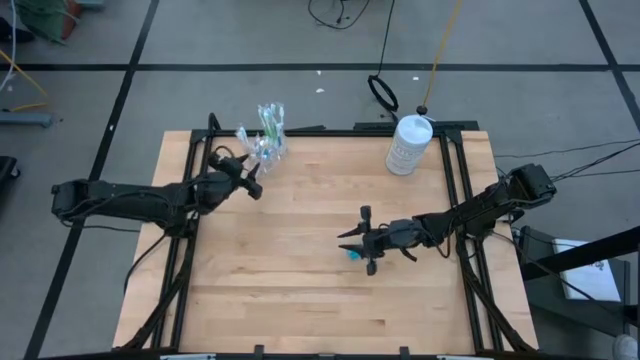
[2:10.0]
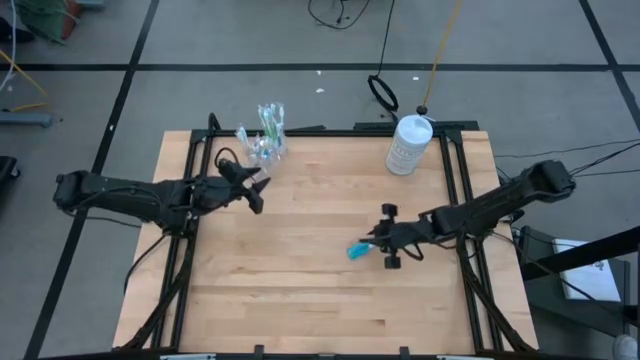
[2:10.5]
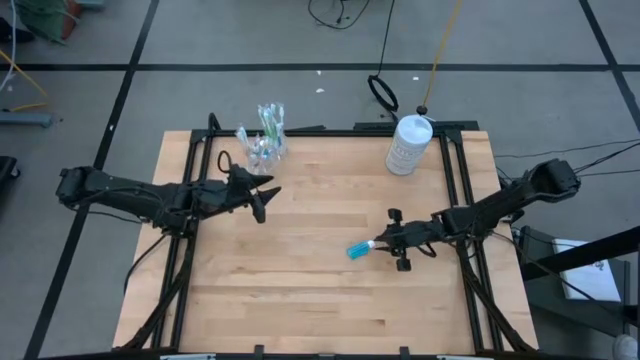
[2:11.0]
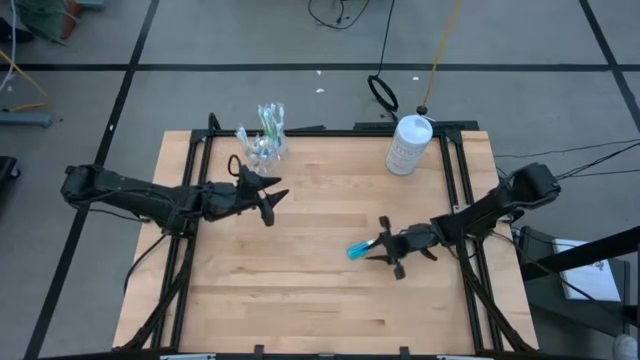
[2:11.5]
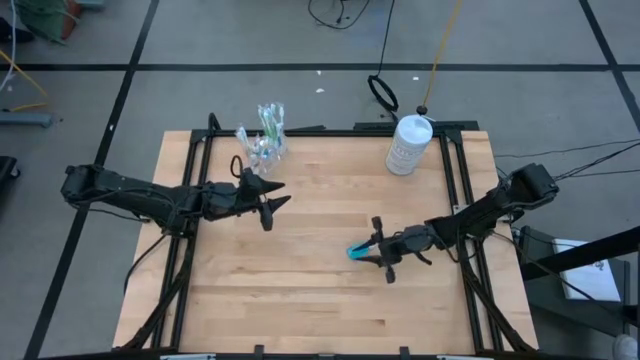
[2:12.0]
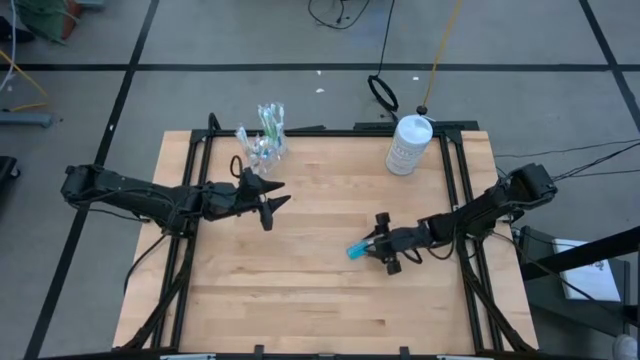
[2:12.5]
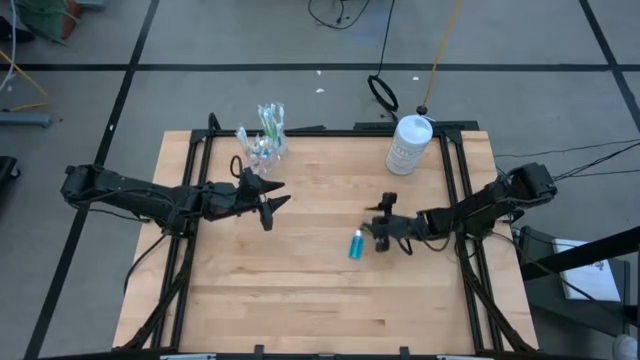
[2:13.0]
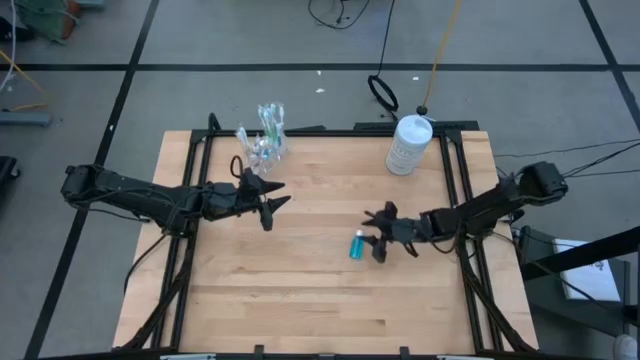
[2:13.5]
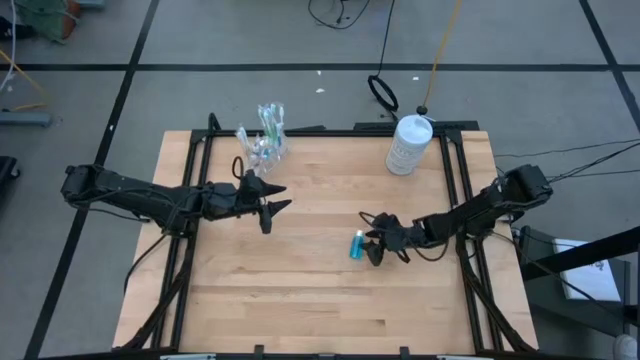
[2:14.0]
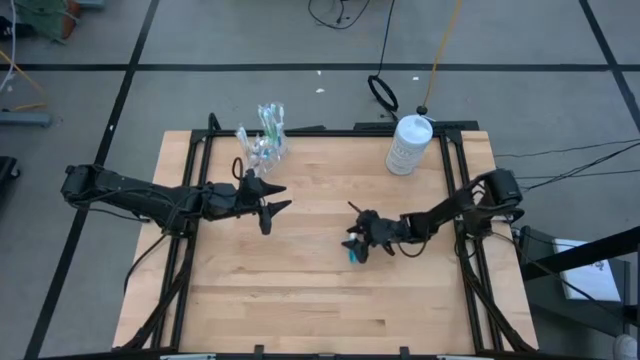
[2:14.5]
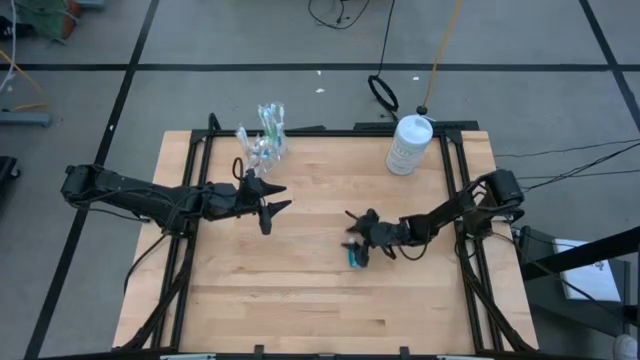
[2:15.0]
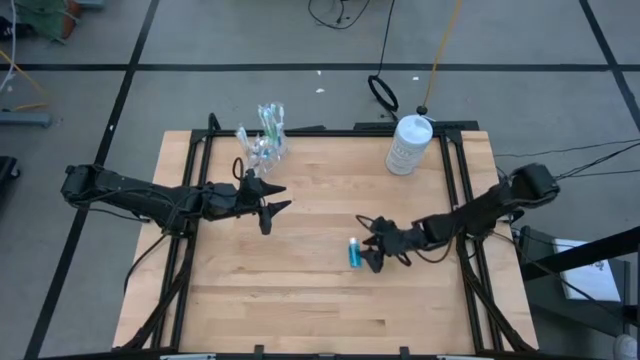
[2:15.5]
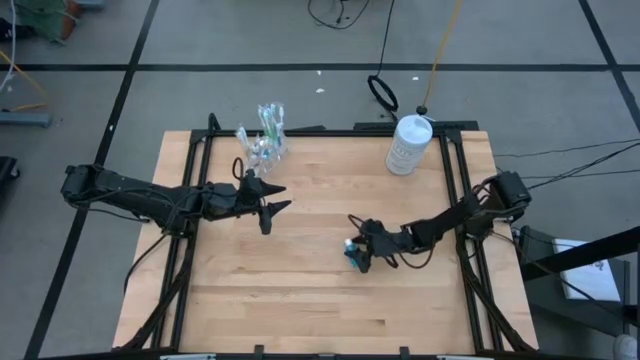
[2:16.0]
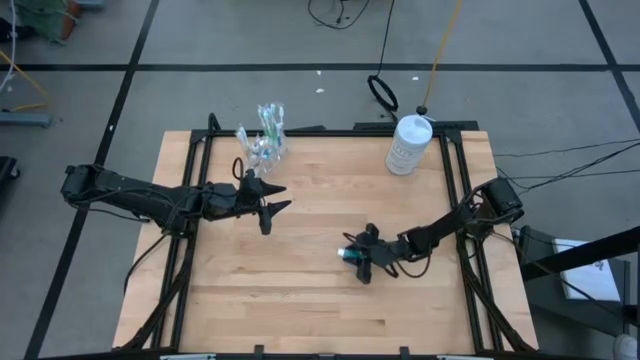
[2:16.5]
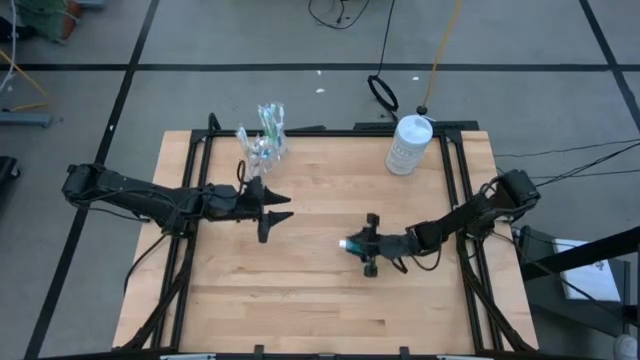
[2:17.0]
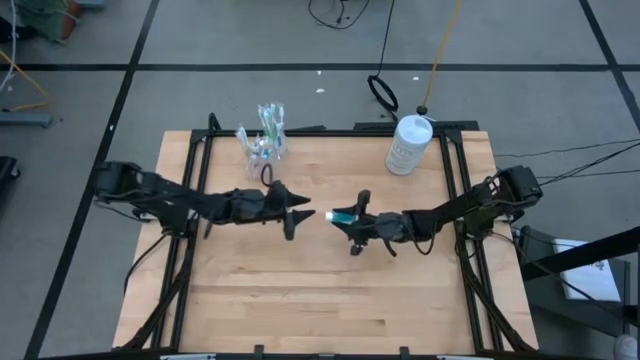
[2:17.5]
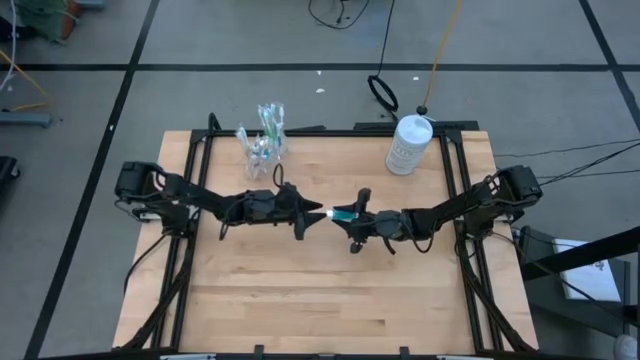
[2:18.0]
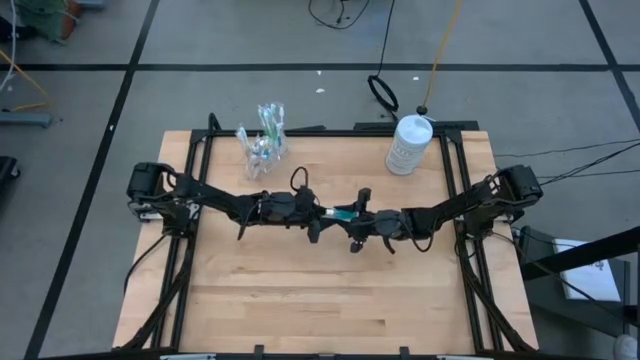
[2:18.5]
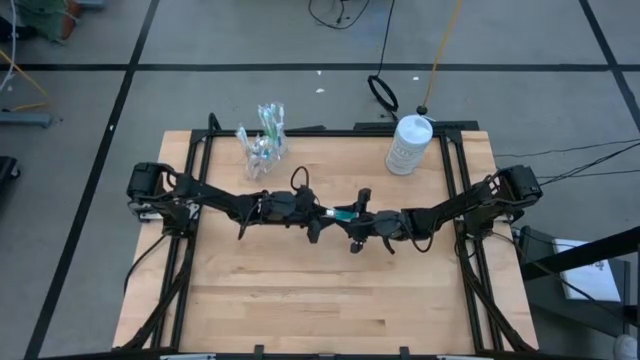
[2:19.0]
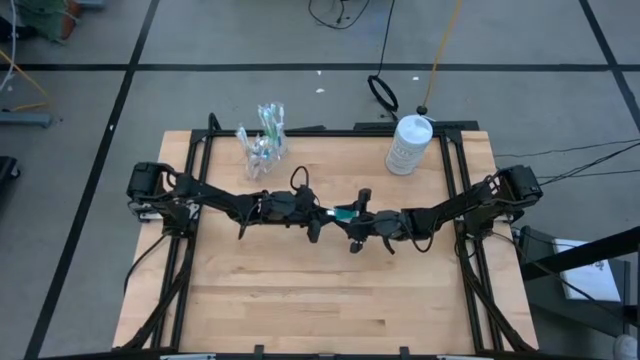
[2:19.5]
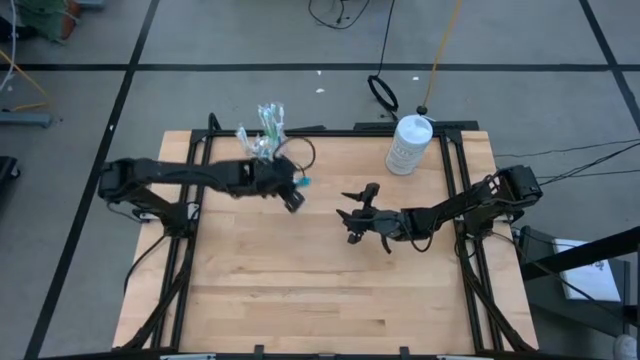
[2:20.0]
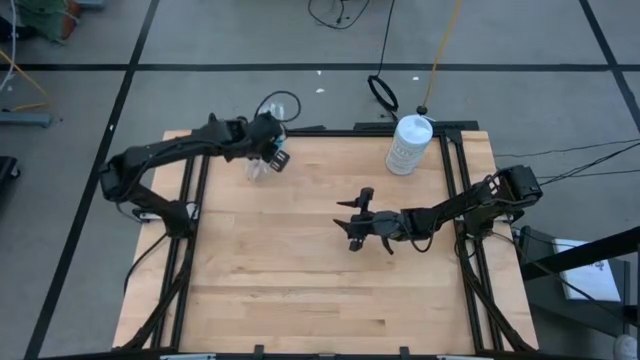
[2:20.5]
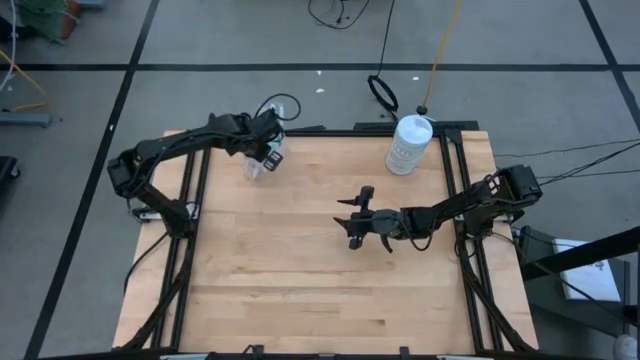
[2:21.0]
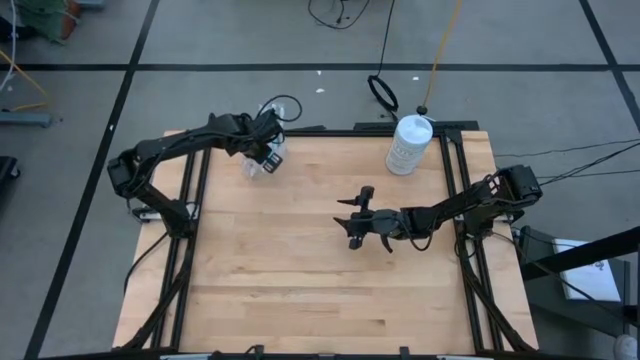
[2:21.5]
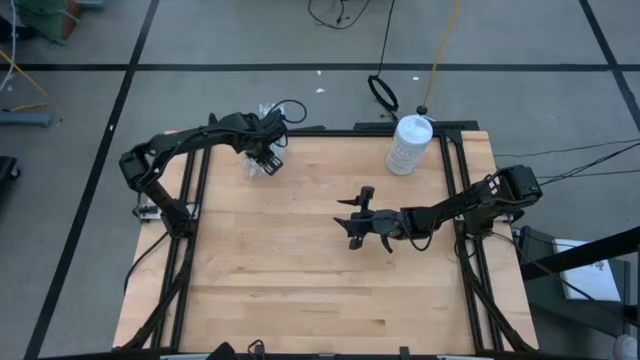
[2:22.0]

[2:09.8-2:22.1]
Task: Pick & Place toothbrushing station
Put the mouthwash into the transparent organizer

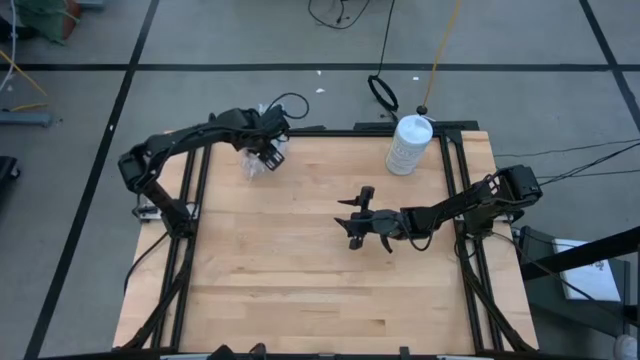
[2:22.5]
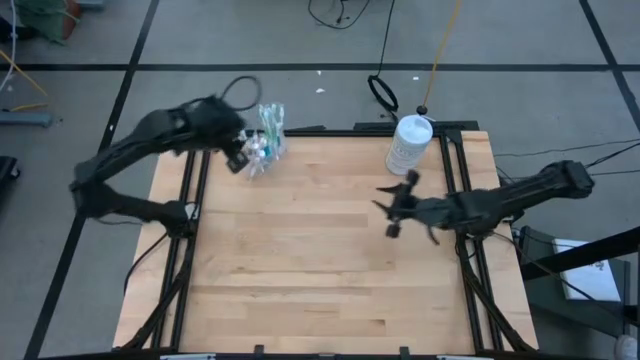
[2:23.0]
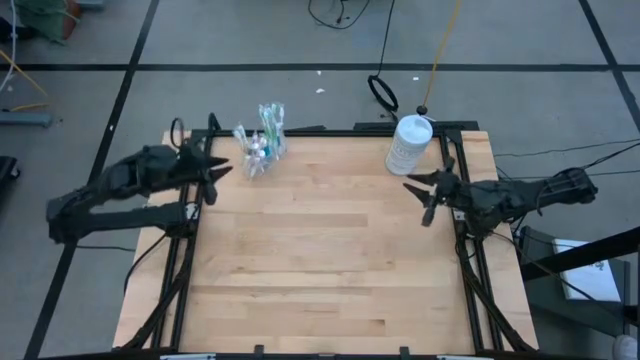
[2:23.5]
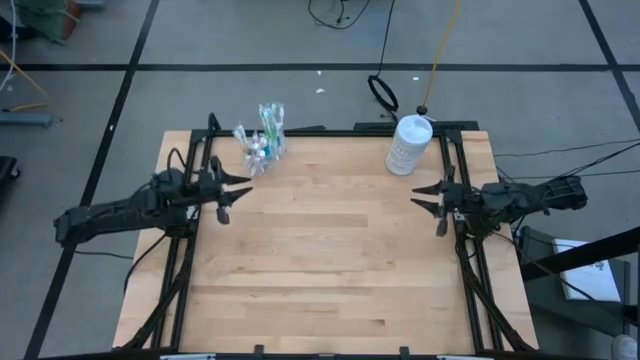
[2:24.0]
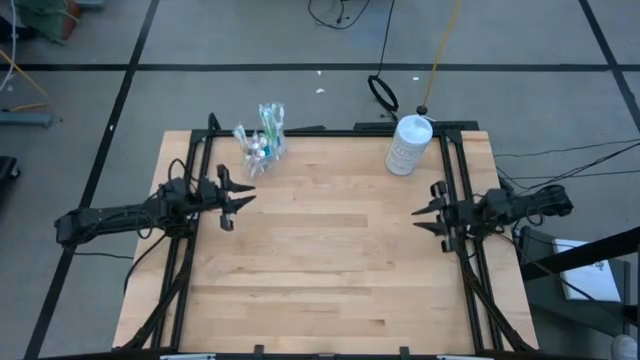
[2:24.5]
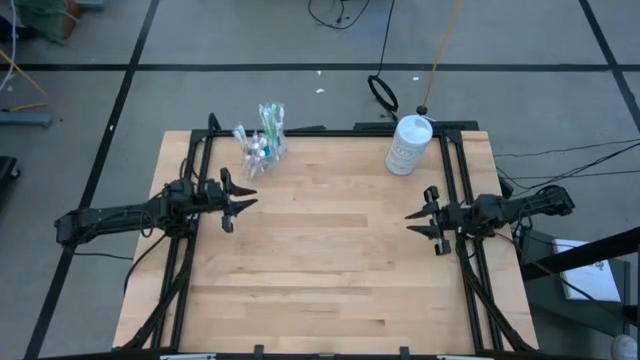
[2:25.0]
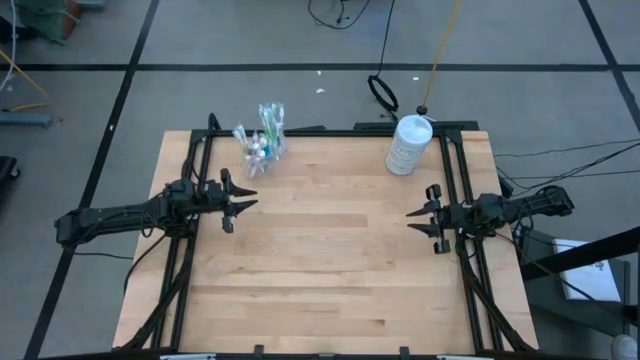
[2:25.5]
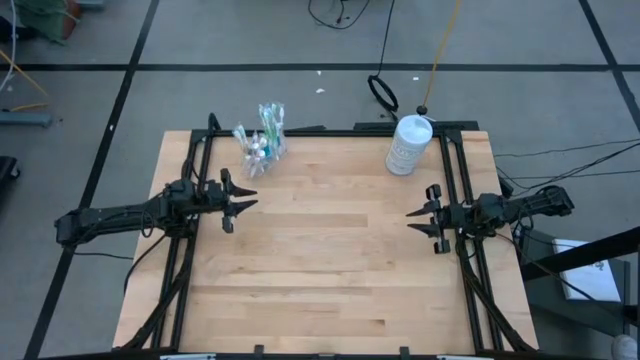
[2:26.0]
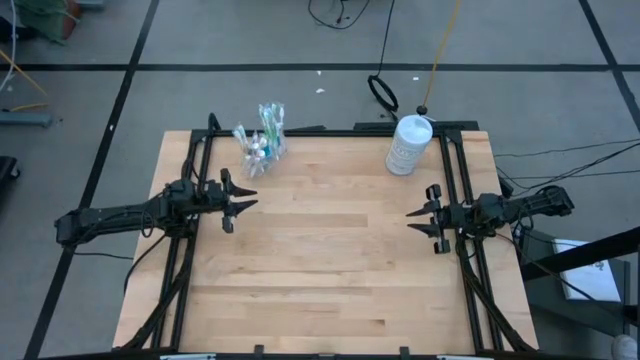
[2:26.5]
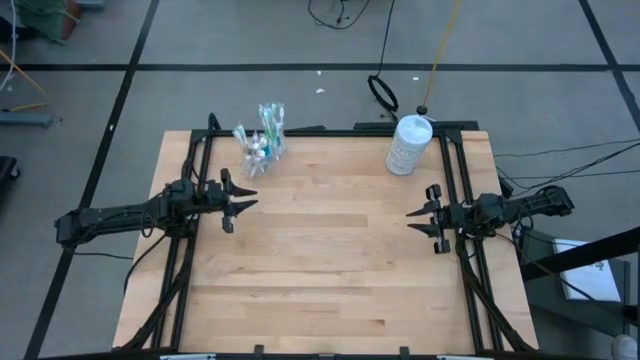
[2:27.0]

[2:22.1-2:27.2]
Return to Home Position

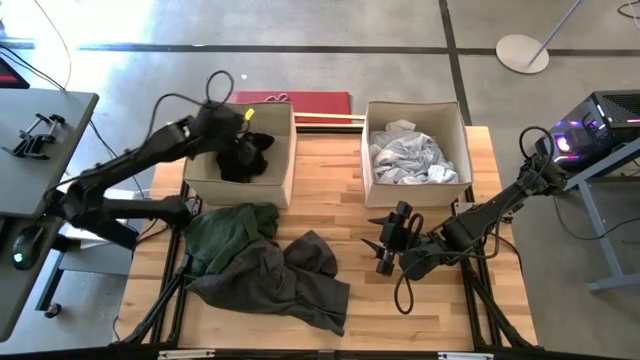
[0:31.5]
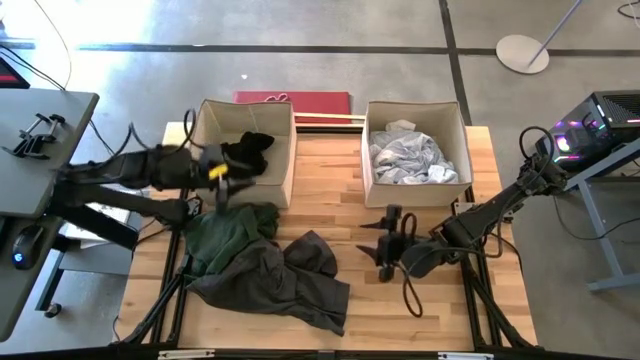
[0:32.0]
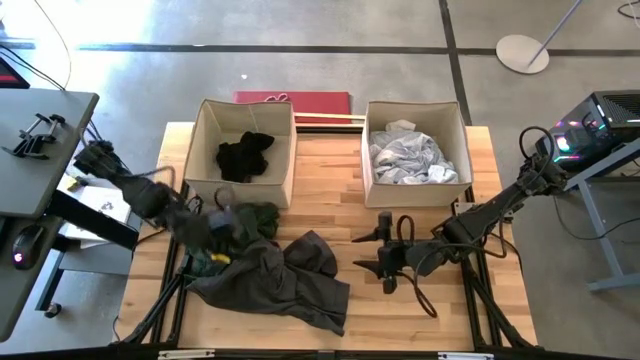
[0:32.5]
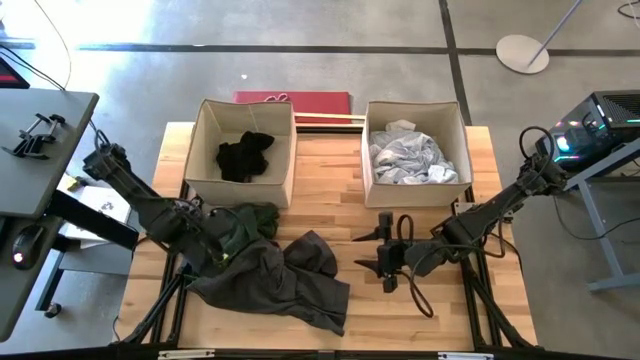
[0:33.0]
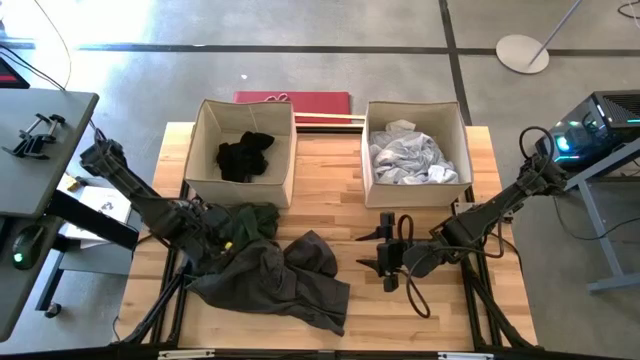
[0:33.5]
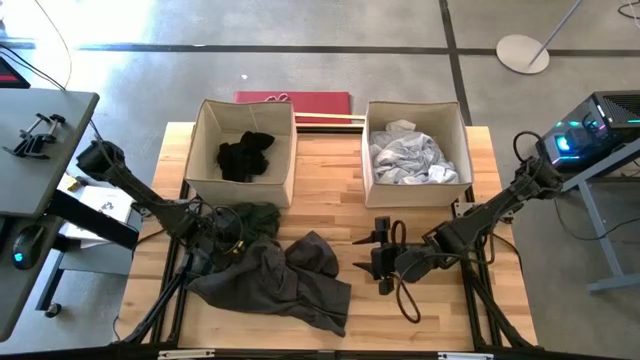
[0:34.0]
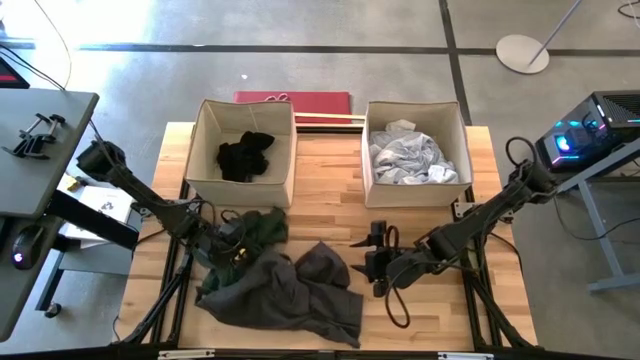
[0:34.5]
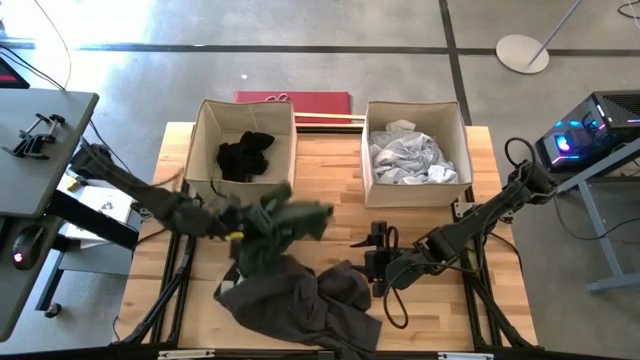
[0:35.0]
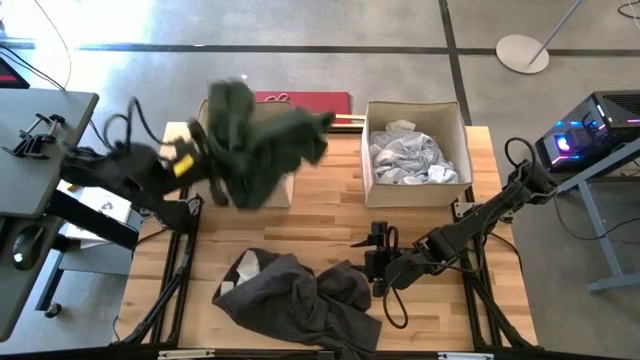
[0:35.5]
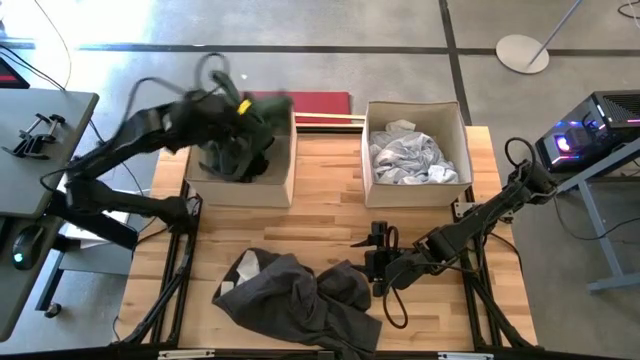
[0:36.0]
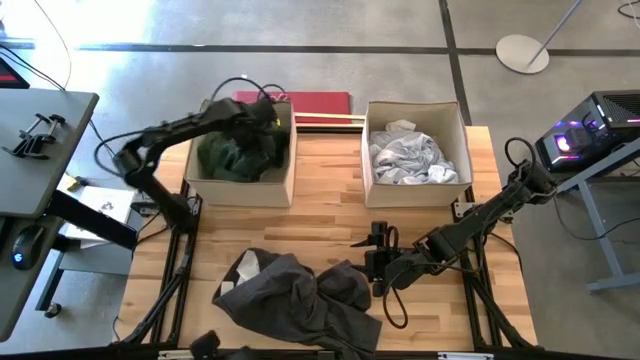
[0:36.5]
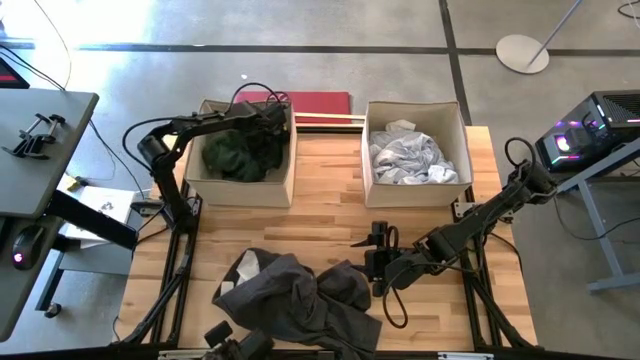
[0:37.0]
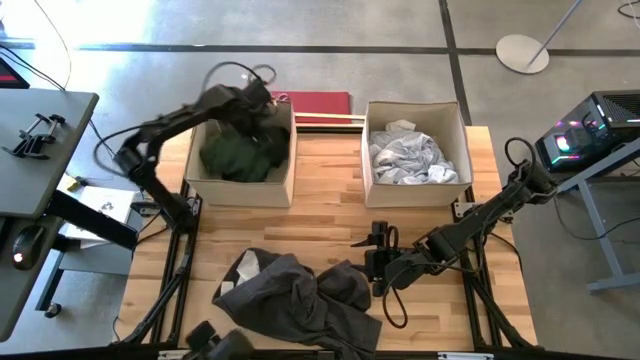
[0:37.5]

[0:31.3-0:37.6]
Task: Sort clothes
Put the green shirt into the left brown laundry bin
